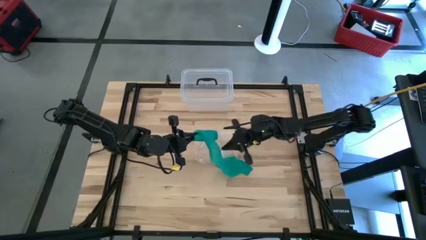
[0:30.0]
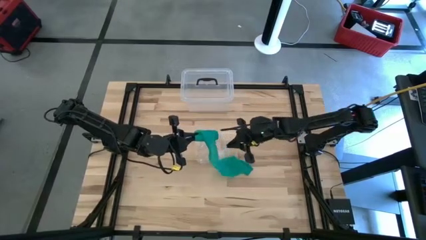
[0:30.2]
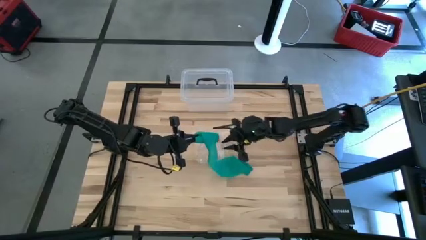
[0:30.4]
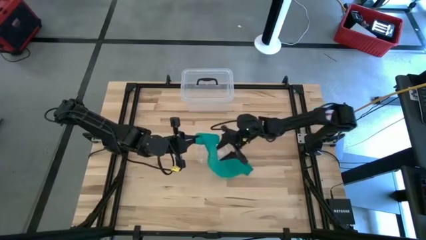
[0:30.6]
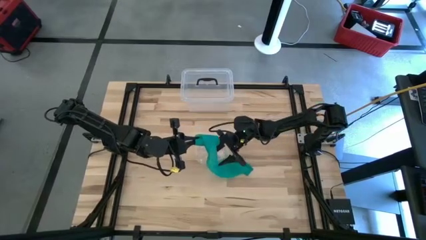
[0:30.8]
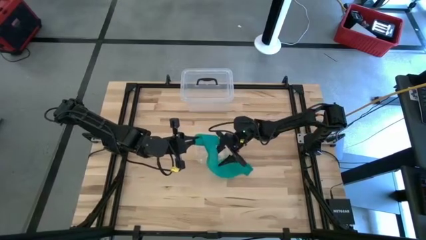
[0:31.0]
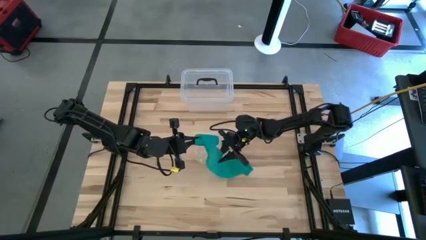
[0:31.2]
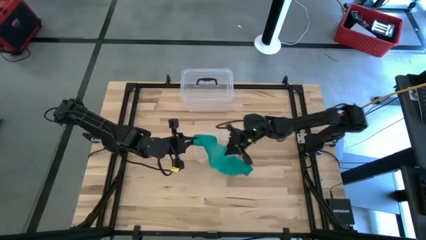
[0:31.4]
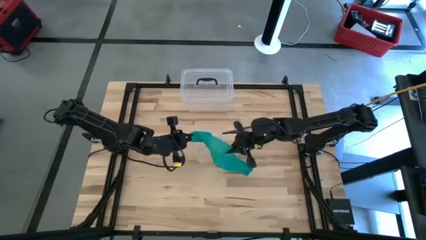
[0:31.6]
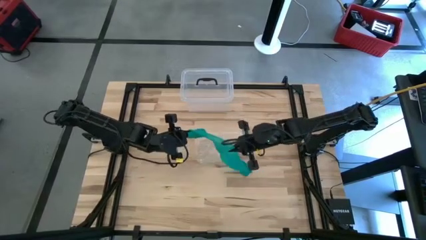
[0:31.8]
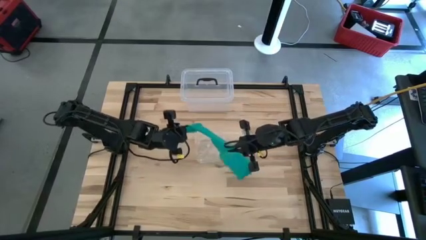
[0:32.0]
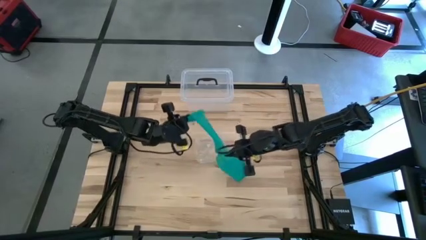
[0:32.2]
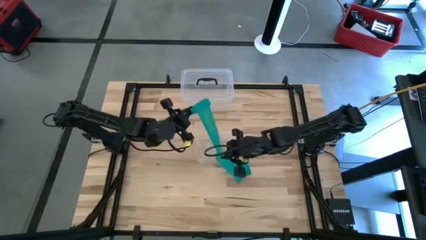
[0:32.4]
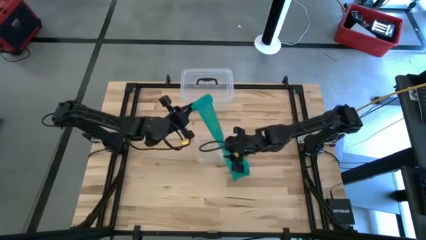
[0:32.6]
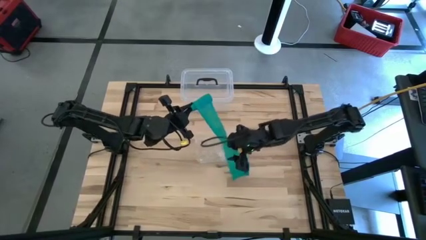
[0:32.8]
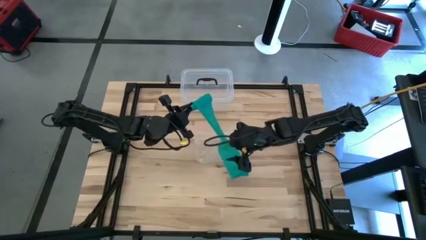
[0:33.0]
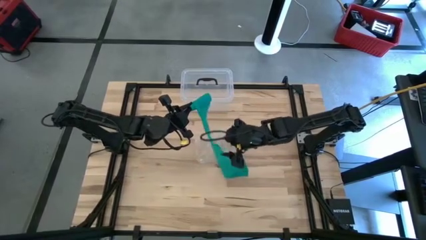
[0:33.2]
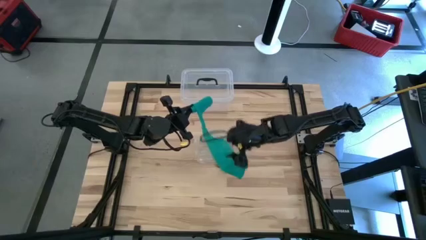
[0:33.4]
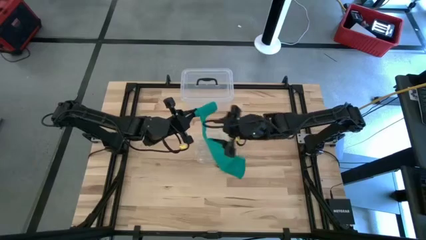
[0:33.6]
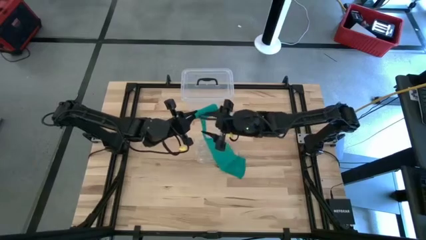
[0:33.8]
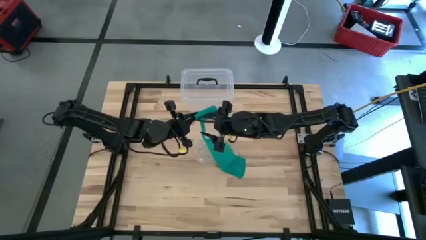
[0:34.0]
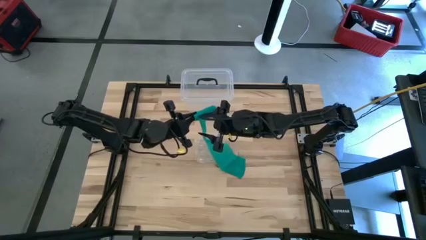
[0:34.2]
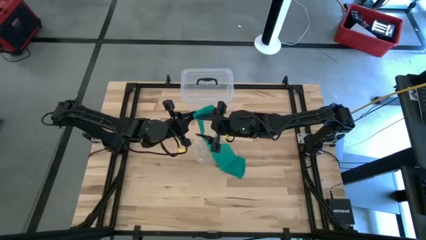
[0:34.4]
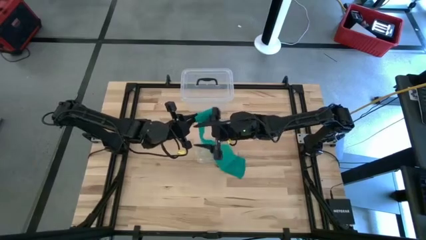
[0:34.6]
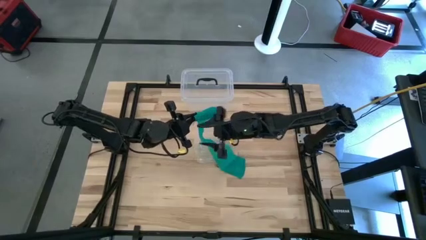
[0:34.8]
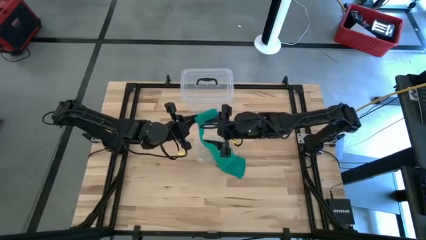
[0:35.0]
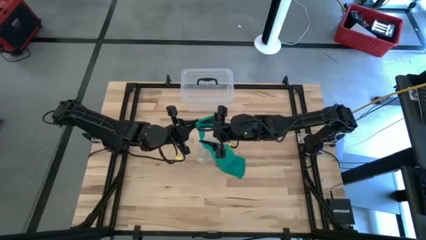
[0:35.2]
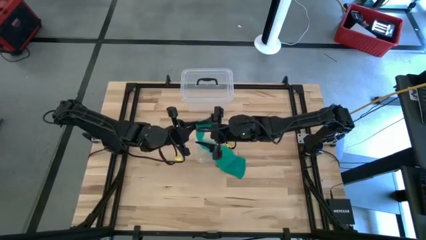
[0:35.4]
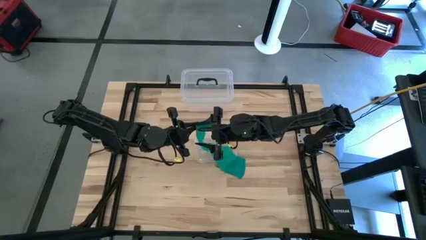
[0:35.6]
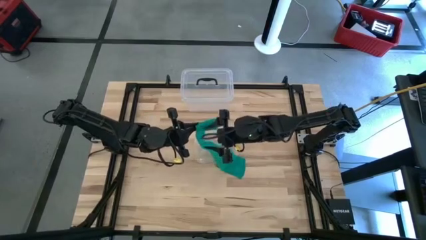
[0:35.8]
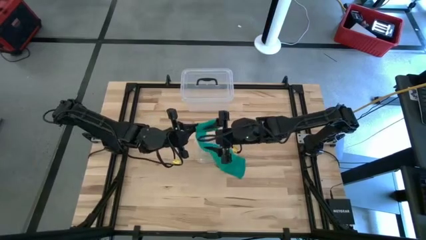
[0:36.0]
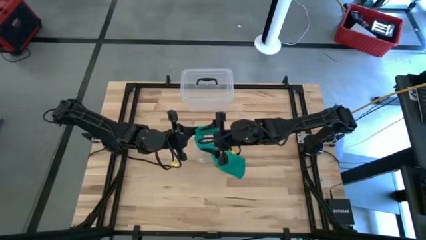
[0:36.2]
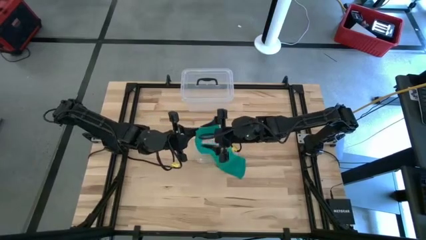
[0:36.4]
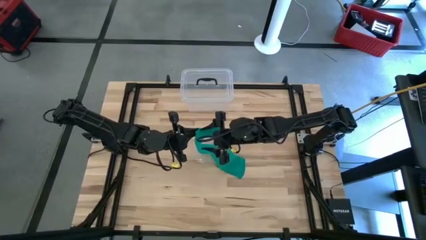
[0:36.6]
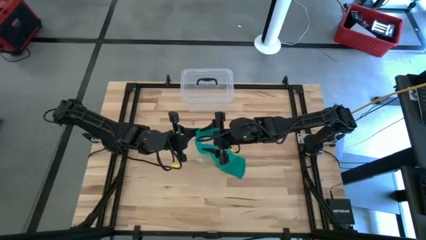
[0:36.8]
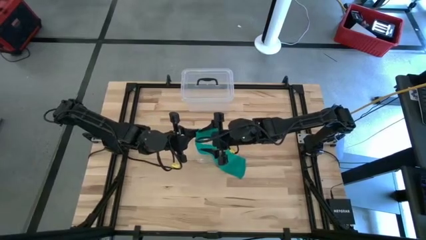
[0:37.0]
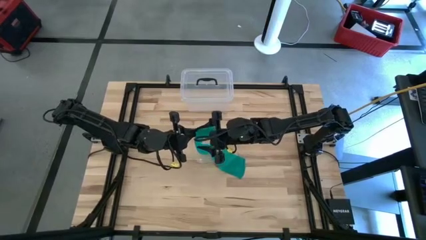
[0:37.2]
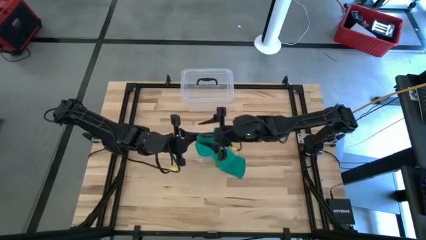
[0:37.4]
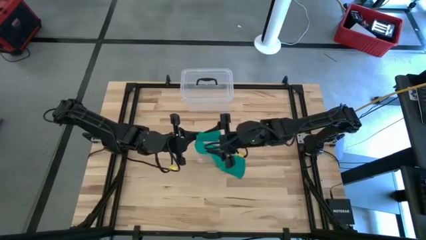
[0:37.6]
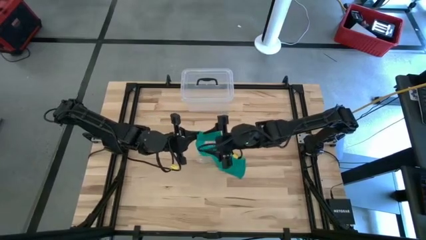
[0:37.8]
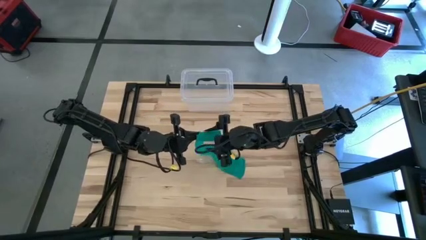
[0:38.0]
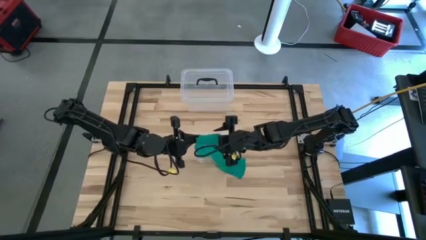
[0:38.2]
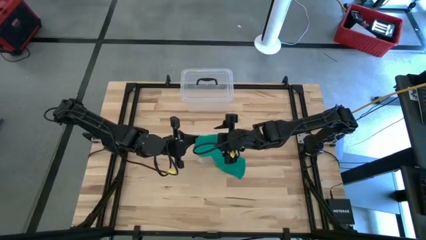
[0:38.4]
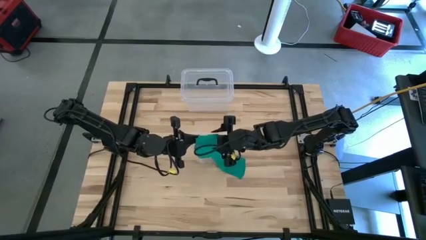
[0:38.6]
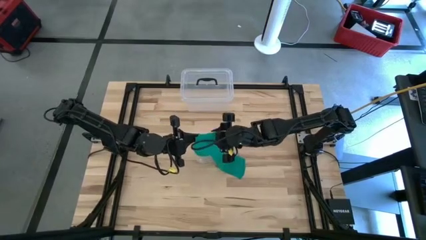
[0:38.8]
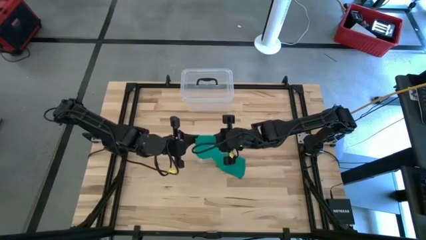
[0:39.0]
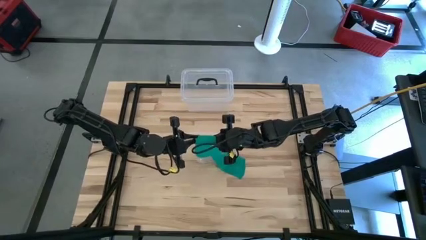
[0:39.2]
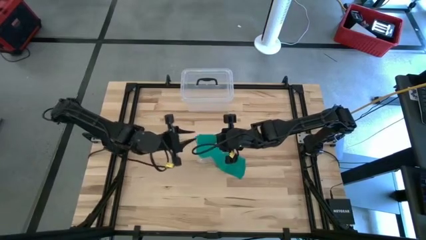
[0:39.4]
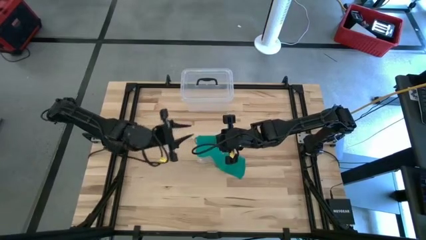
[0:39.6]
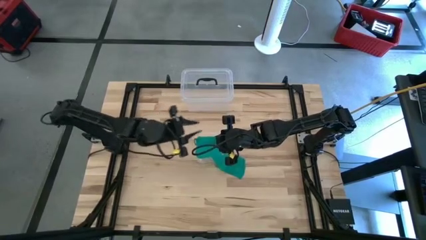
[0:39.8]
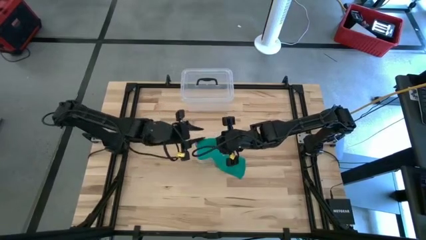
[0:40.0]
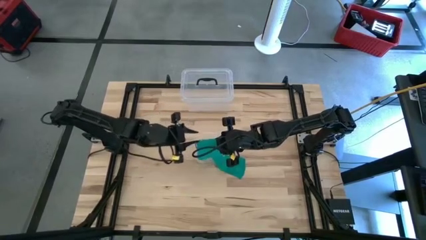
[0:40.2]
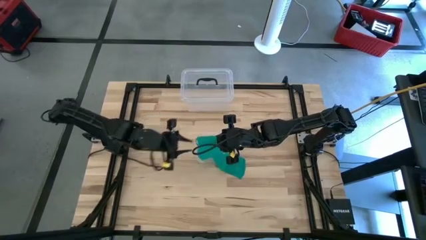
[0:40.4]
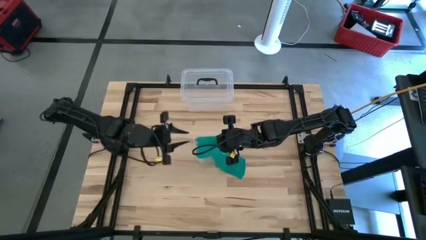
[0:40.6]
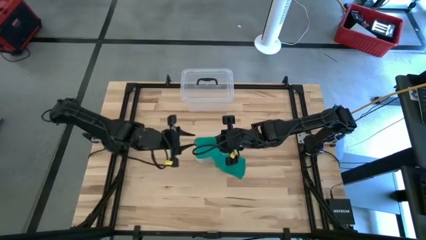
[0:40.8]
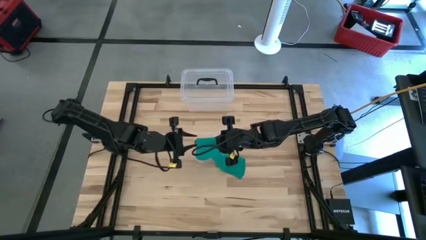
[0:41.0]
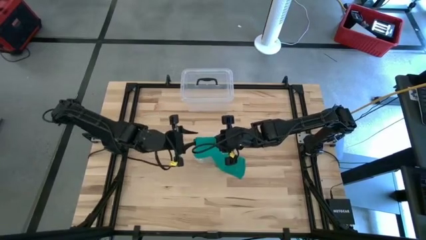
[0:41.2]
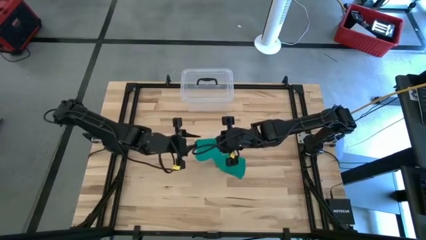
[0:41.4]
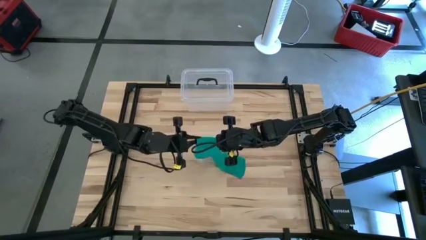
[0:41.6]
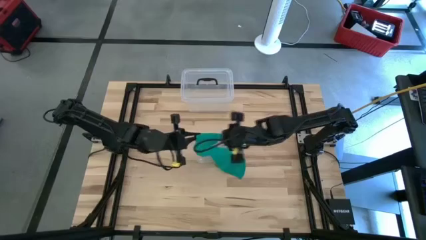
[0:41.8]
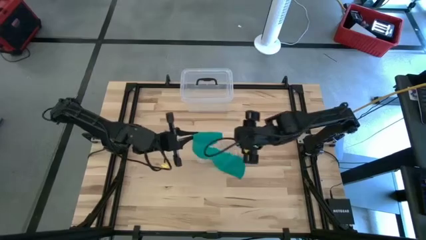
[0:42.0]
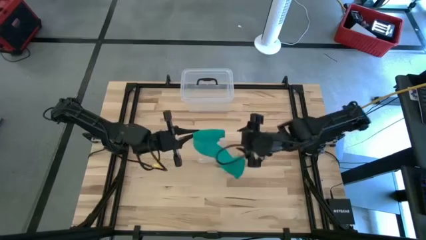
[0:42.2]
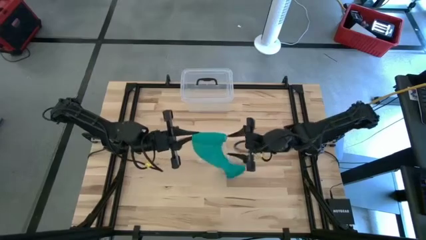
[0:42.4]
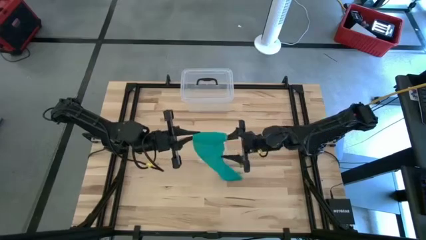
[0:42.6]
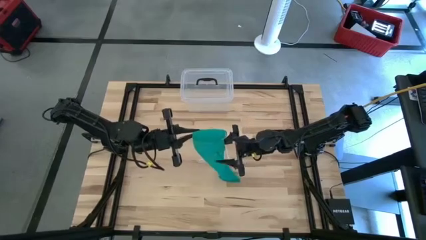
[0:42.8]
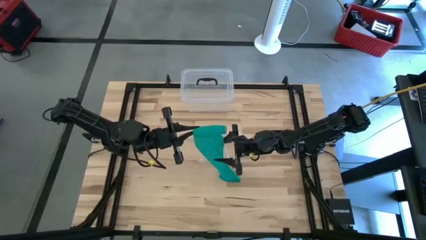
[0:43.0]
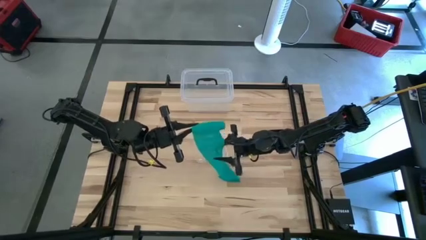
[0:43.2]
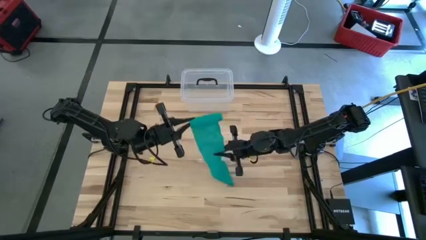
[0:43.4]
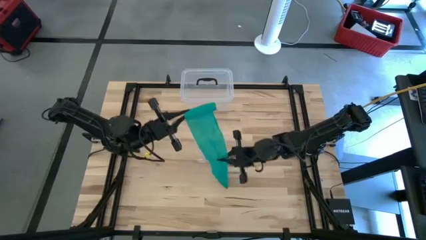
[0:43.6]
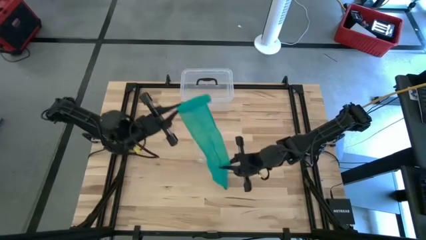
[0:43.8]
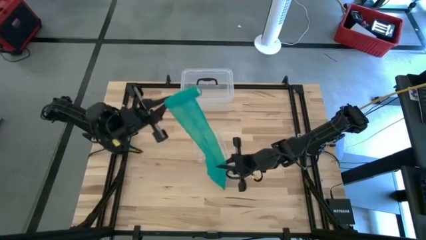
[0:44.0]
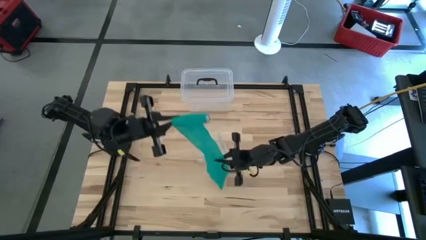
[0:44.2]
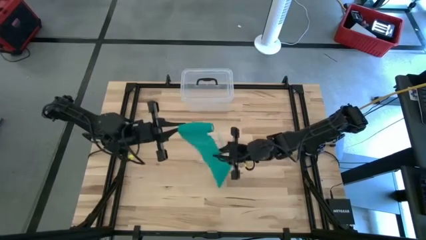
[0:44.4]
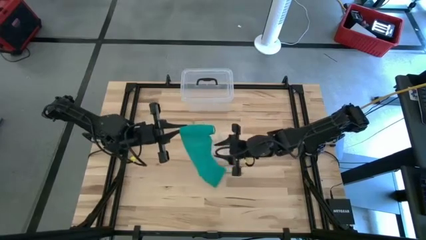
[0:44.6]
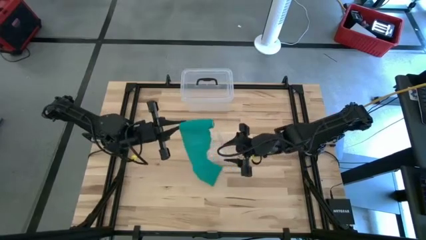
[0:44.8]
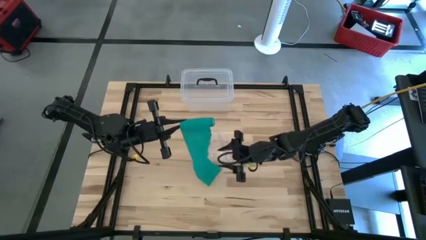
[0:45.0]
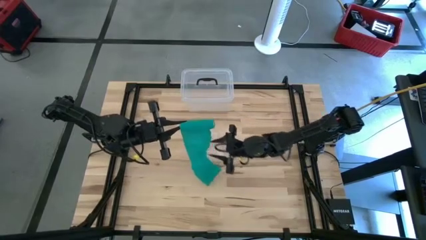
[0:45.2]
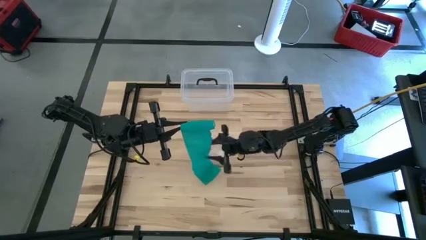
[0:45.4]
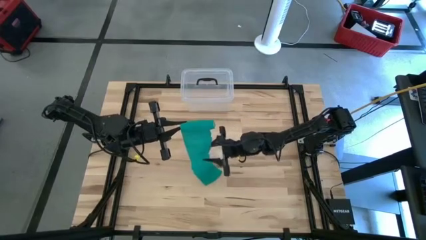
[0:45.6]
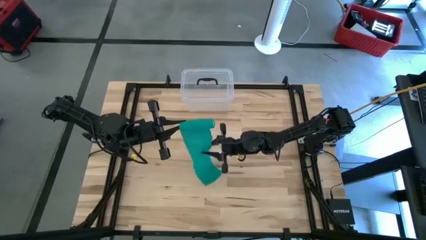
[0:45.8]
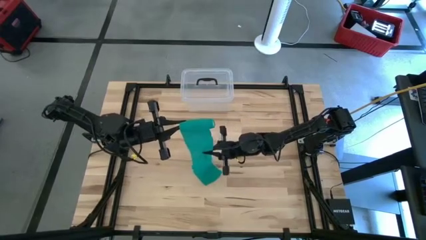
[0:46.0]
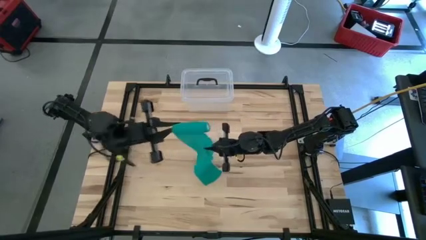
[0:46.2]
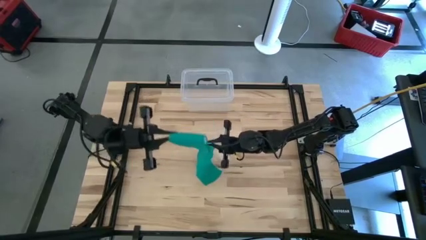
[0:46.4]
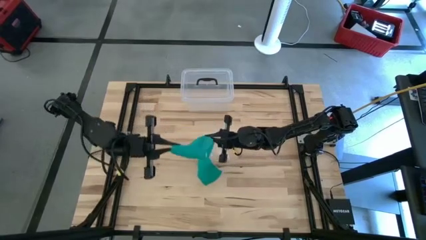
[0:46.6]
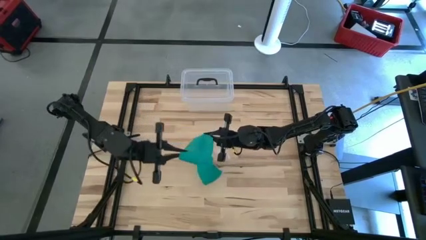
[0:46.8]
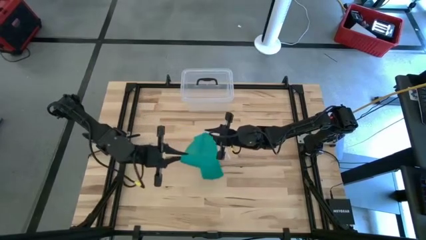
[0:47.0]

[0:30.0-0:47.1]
Task: Roll bandage
Roll the green bandage
